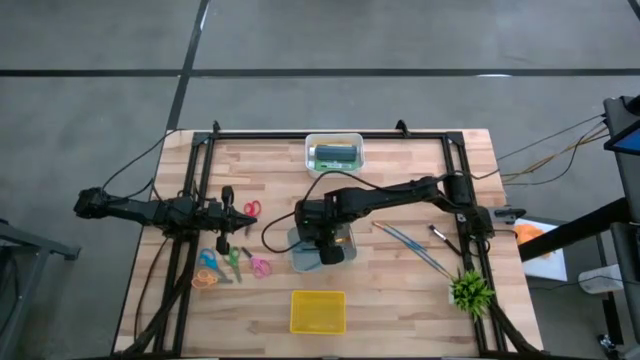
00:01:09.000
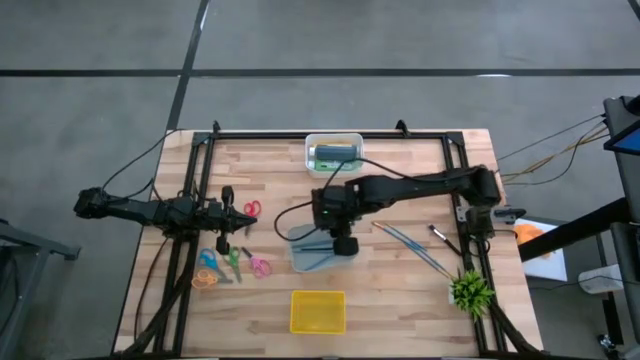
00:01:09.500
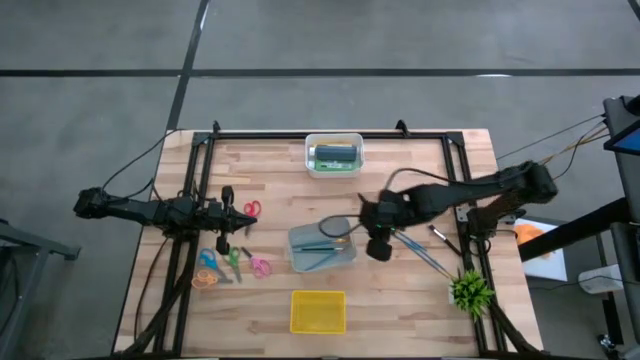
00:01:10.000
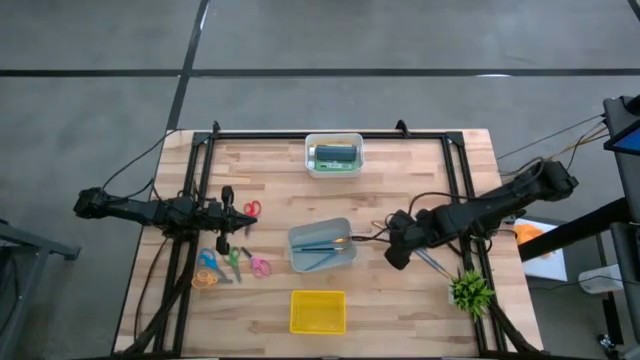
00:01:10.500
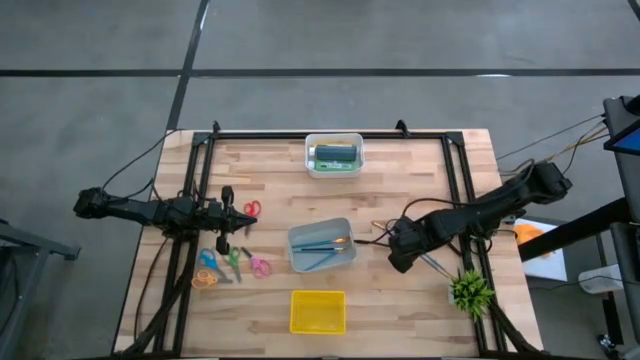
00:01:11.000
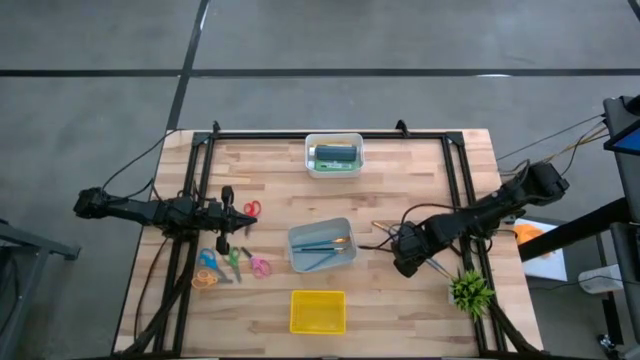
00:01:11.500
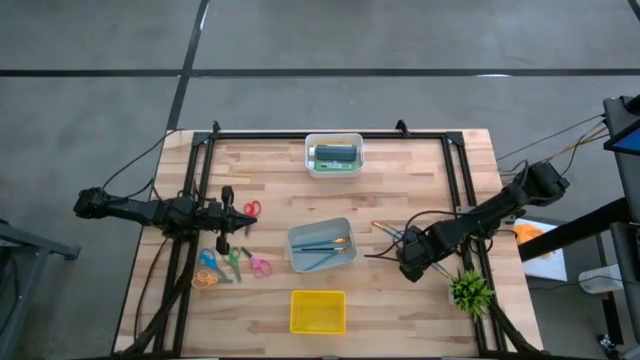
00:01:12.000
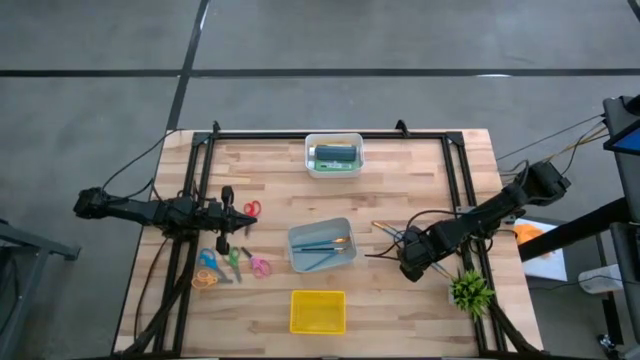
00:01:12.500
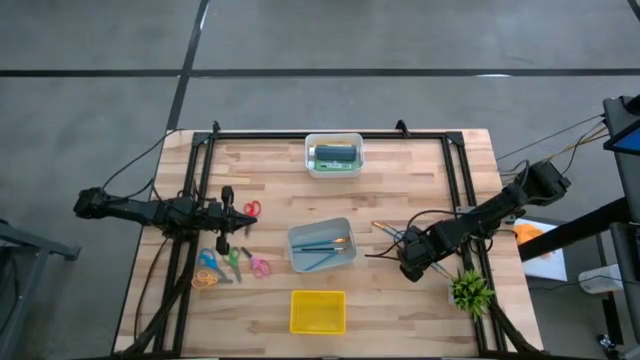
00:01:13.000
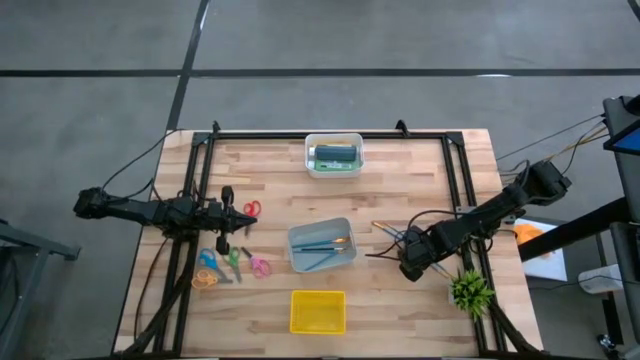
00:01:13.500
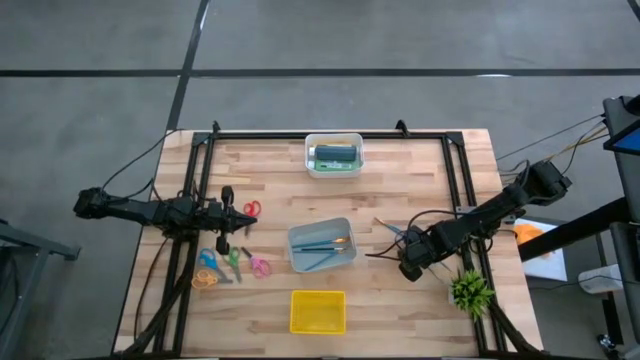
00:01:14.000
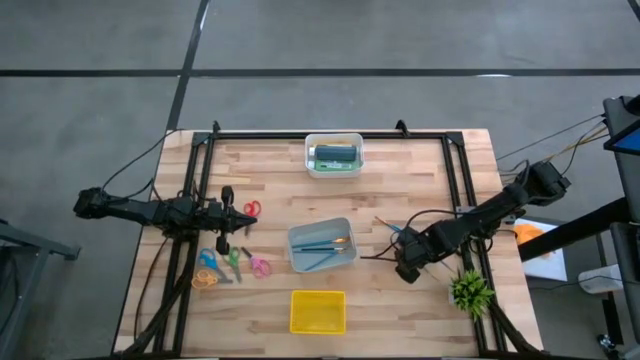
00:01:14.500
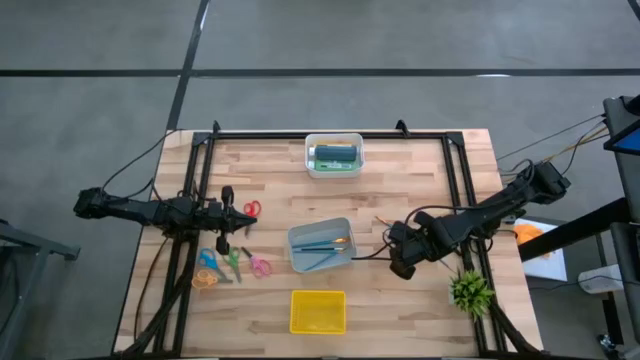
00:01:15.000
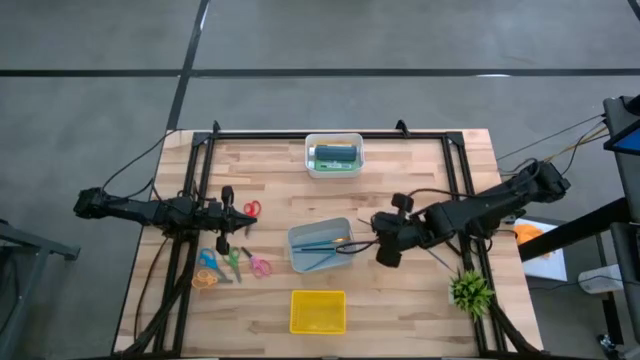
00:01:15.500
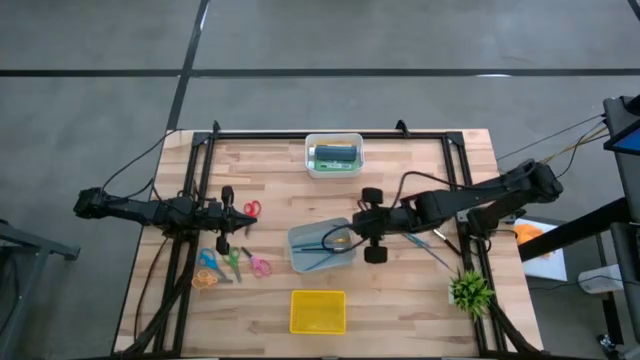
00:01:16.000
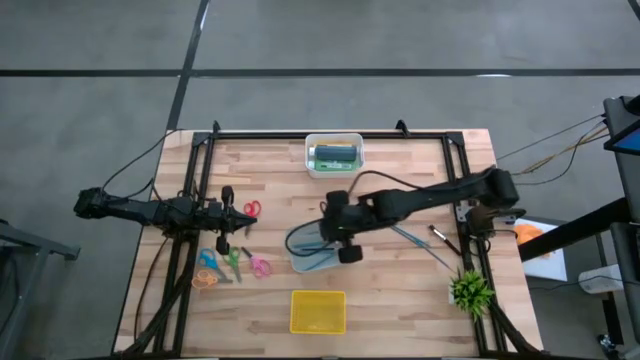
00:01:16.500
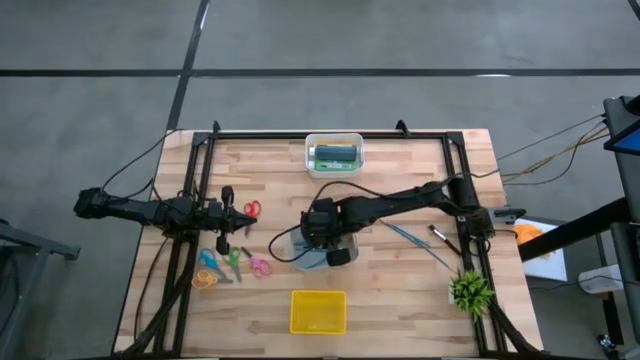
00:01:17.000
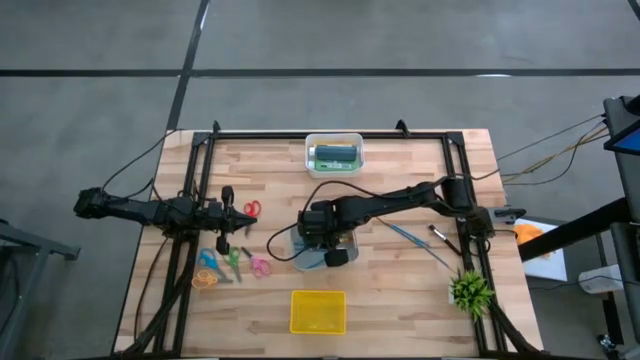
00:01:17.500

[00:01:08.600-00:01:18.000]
Task: Pick & Place Paint Supplies
Put the blue paint brush into the gray bin

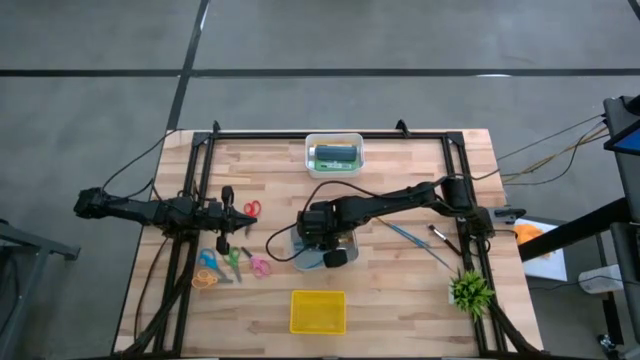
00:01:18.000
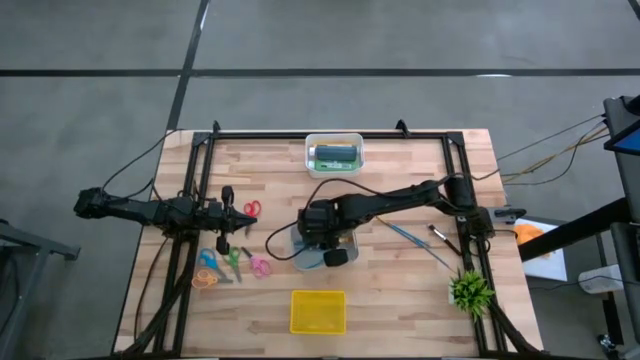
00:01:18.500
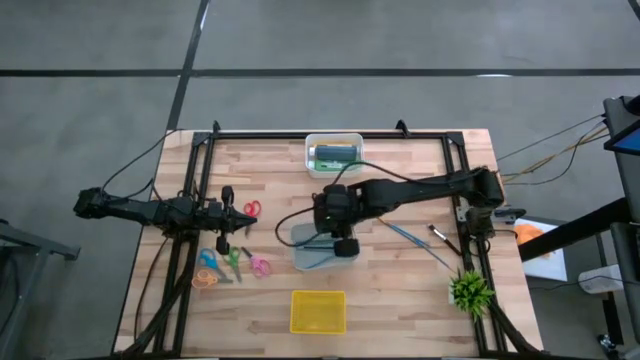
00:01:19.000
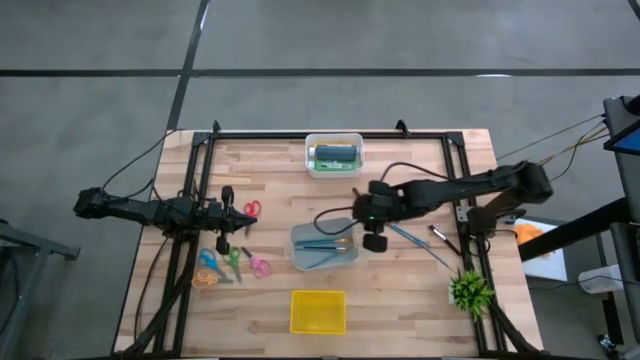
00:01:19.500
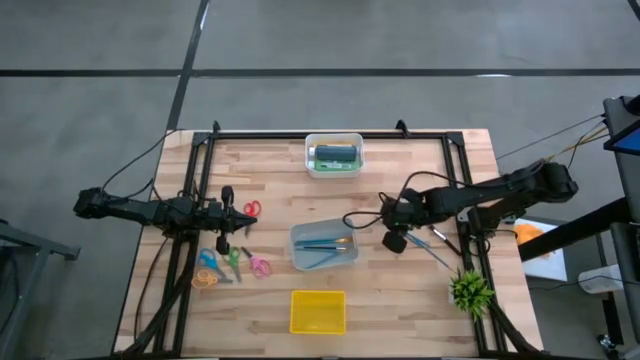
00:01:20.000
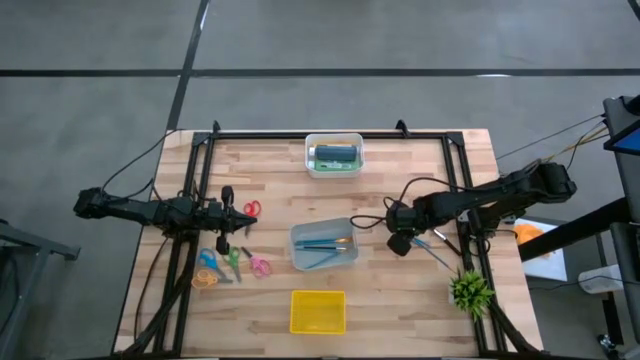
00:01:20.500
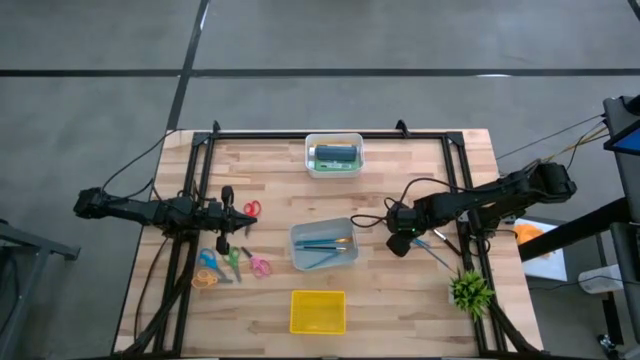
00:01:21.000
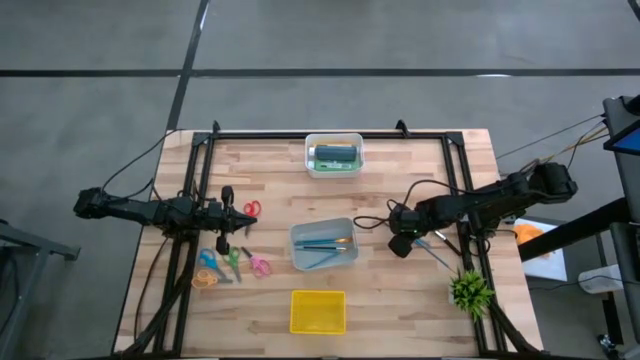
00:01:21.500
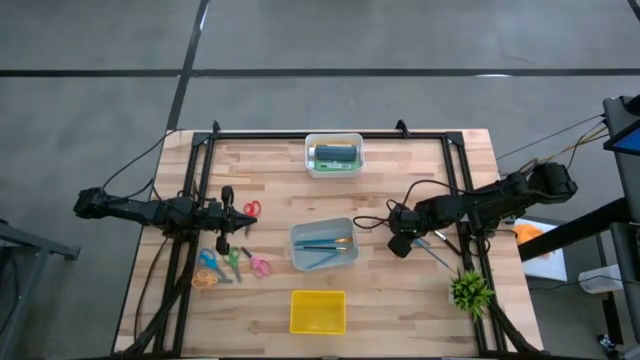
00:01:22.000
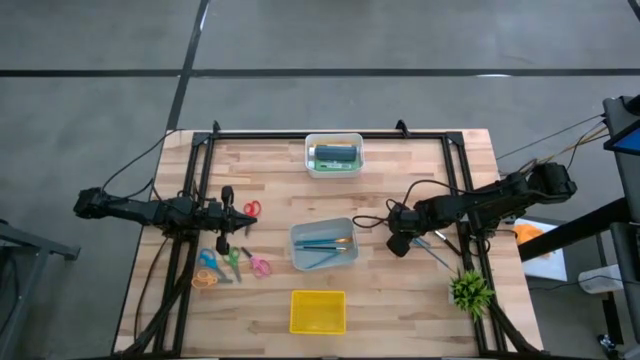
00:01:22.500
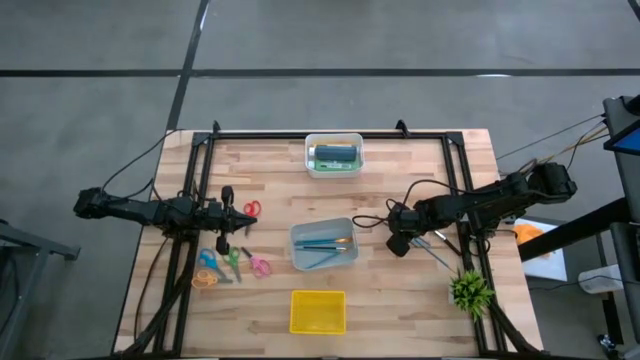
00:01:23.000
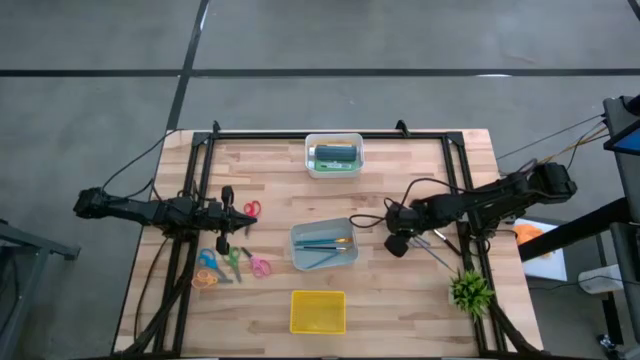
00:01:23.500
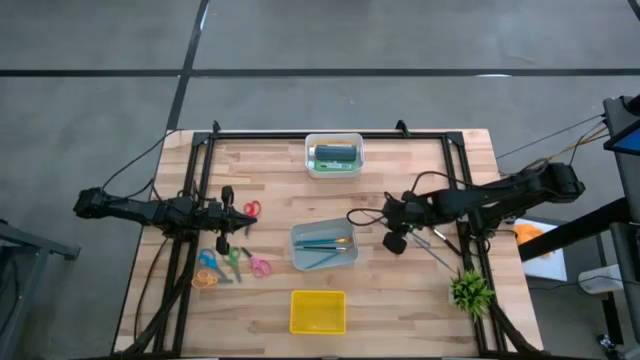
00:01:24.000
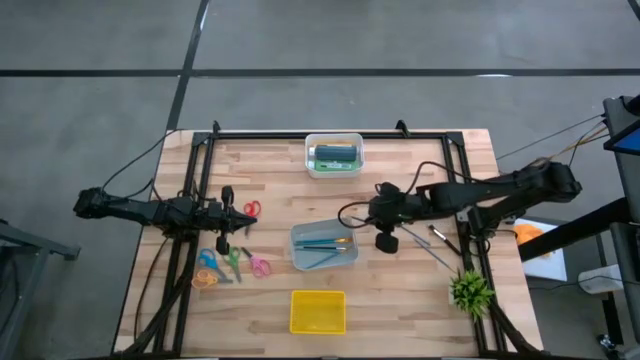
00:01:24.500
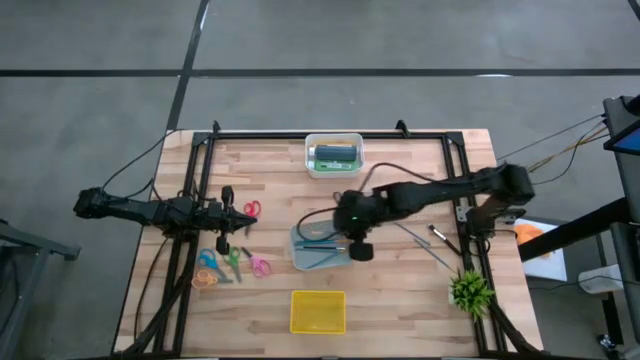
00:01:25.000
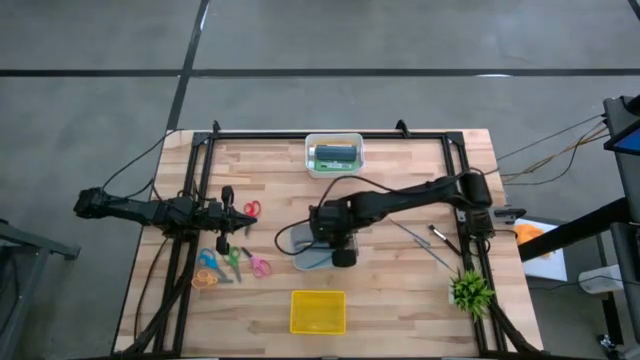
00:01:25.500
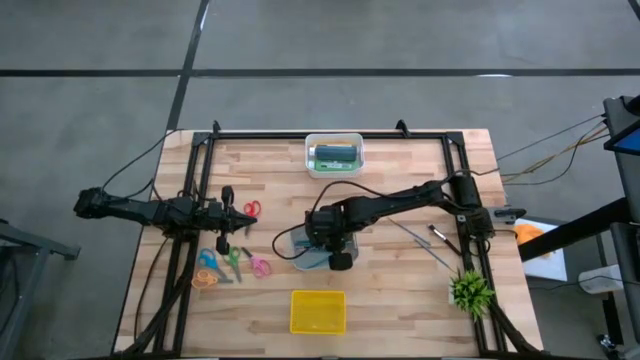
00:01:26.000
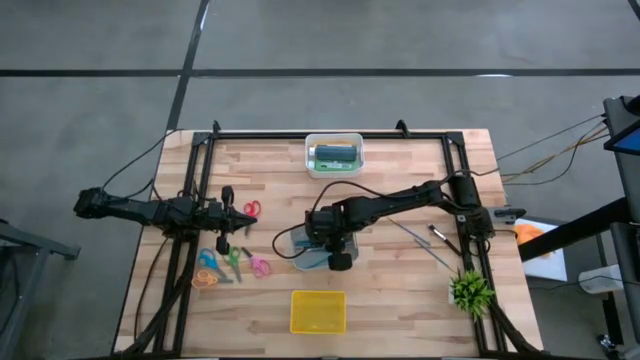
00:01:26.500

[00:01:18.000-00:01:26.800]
Put the blue paint brush into the gray bin

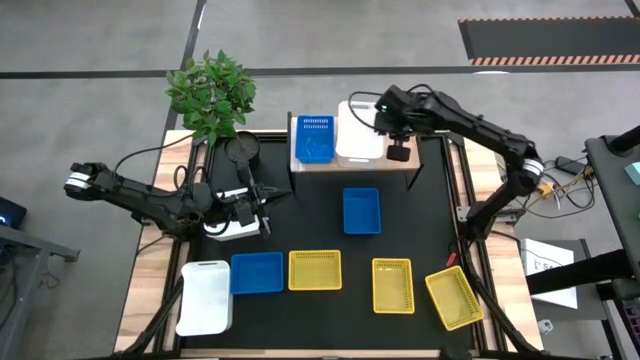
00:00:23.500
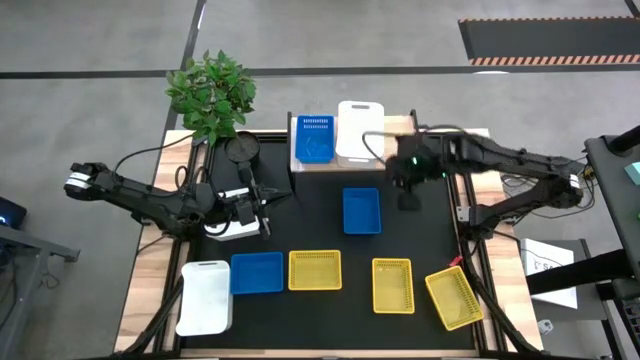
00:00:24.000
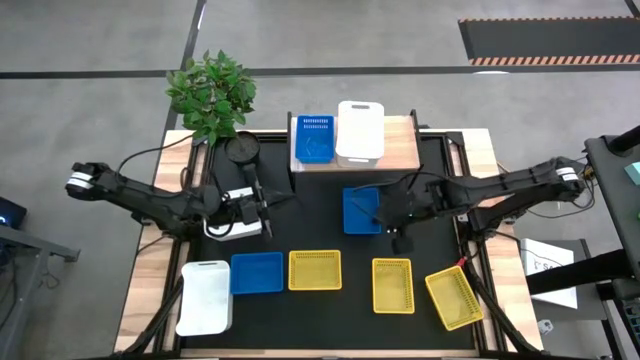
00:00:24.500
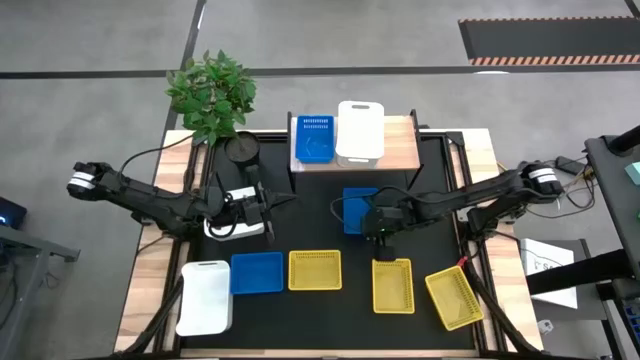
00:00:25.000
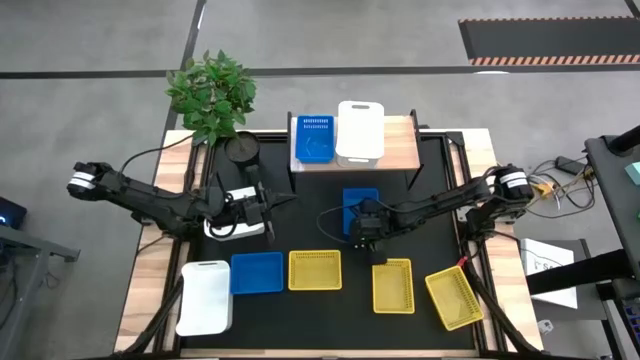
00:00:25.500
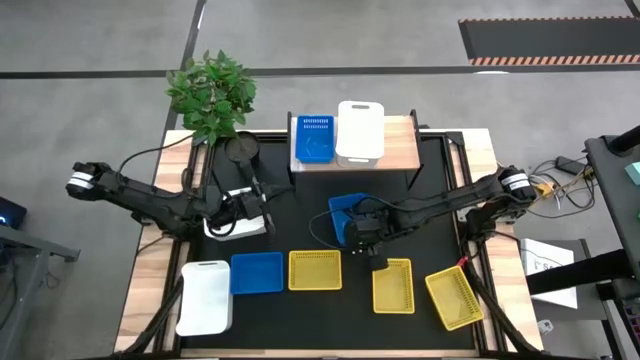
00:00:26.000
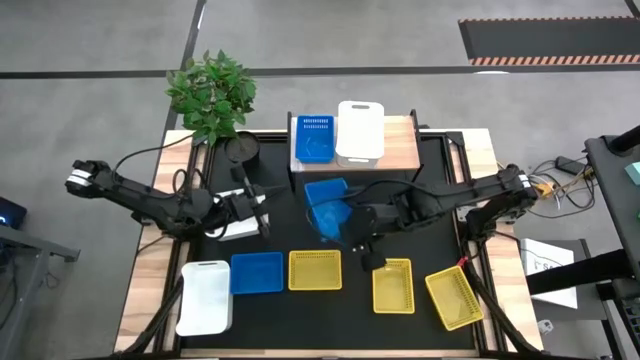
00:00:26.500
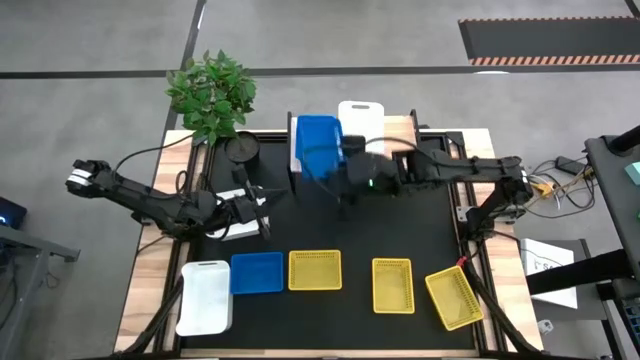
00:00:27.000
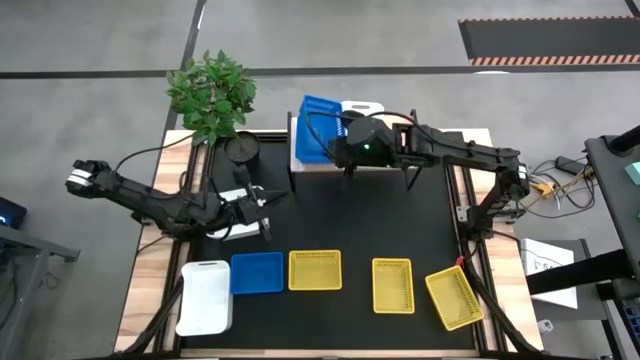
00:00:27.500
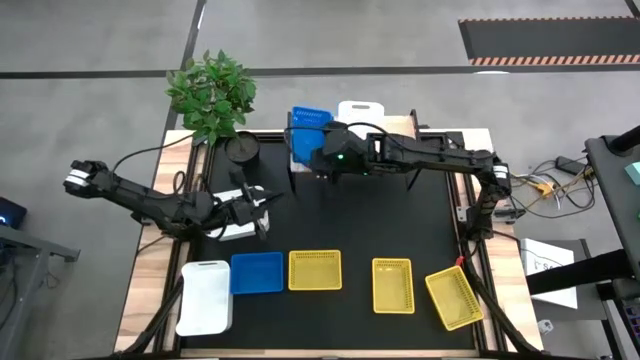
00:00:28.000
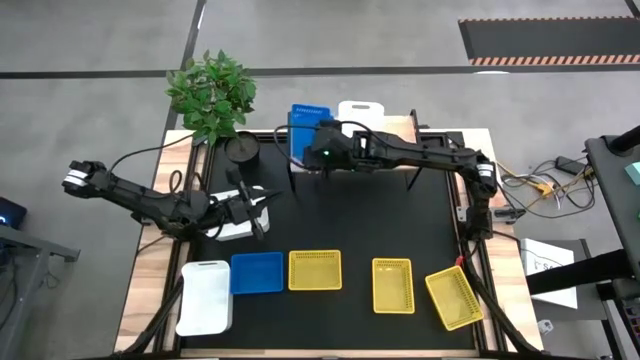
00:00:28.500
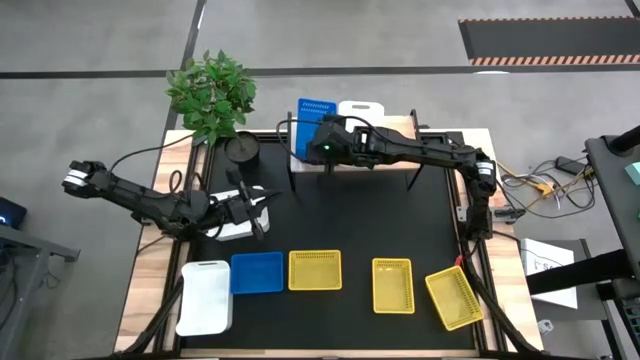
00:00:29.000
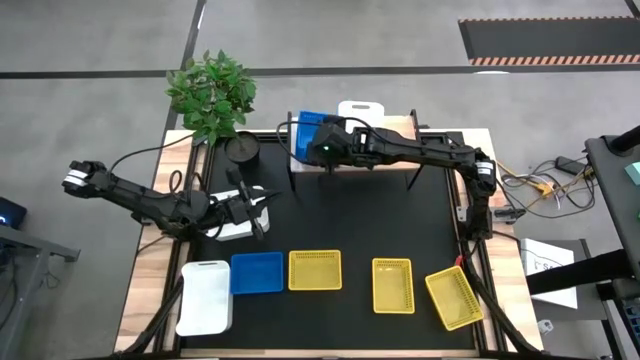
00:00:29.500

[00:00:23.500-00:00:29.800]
Task: Stack baskets on shelf by color
Stack the top blue bin on the other blue bin on the shelf
